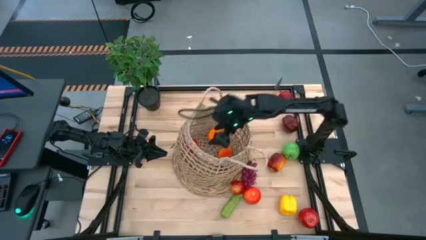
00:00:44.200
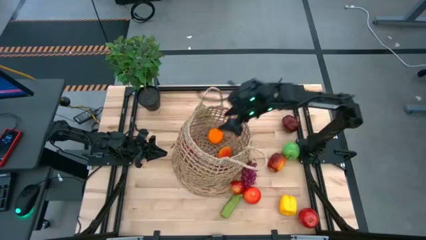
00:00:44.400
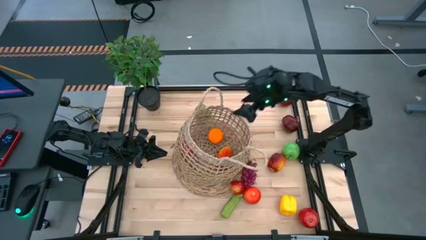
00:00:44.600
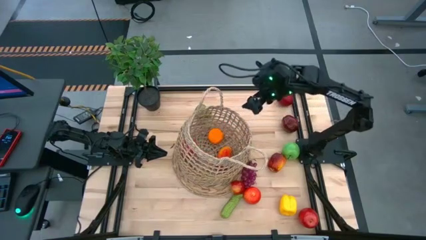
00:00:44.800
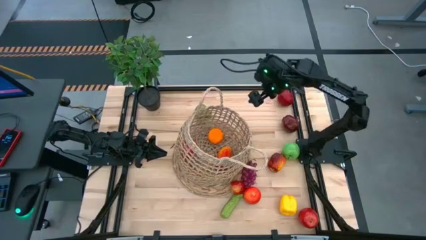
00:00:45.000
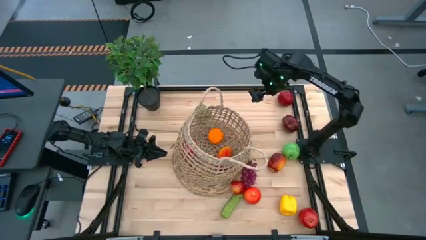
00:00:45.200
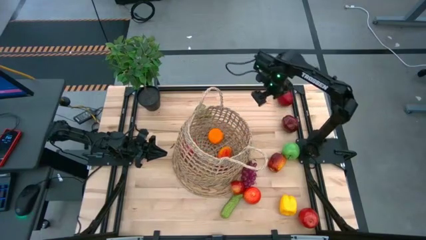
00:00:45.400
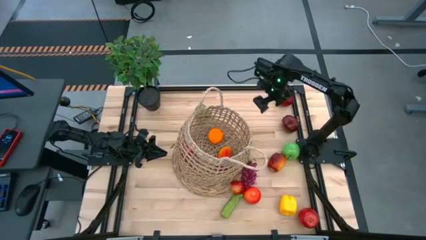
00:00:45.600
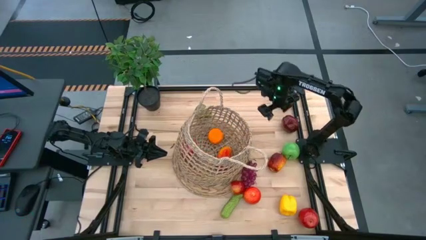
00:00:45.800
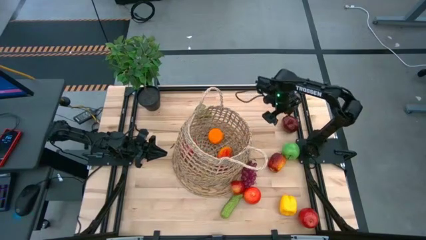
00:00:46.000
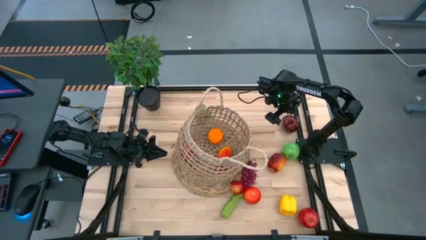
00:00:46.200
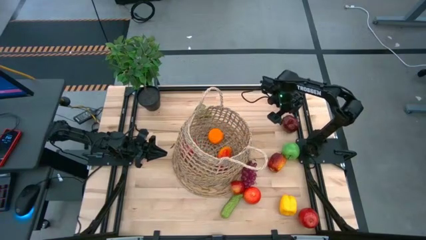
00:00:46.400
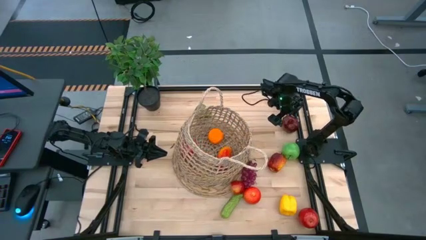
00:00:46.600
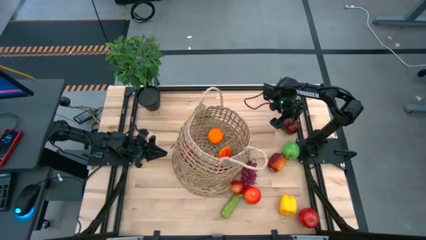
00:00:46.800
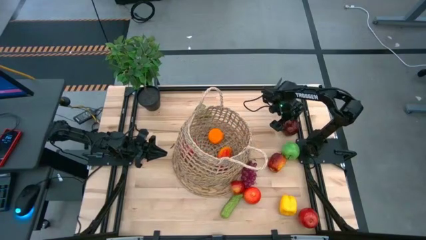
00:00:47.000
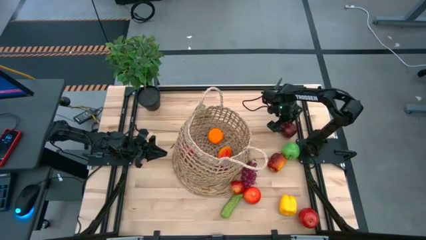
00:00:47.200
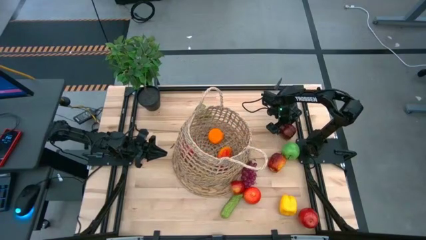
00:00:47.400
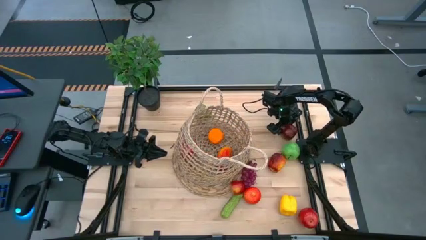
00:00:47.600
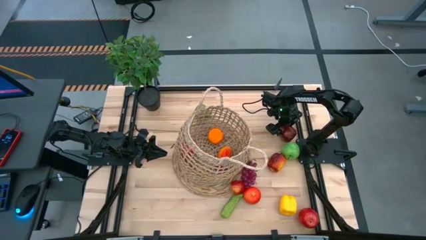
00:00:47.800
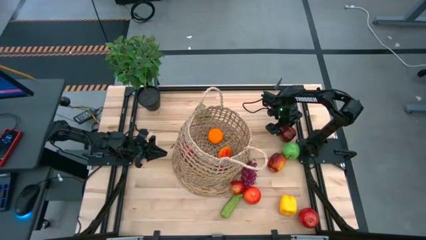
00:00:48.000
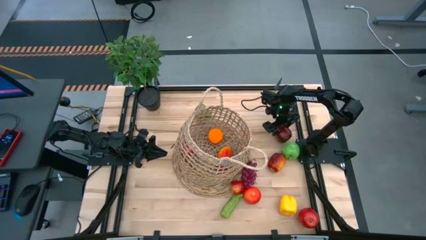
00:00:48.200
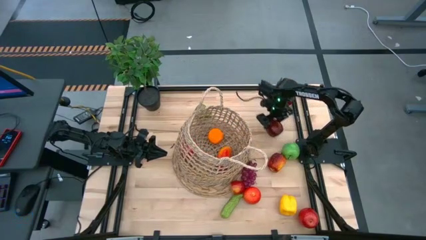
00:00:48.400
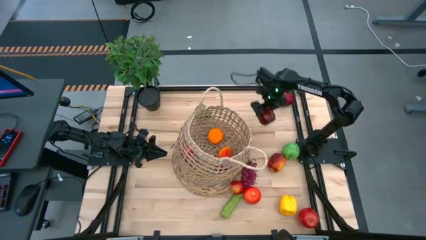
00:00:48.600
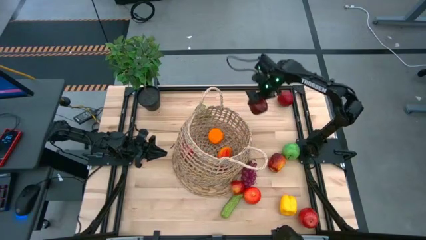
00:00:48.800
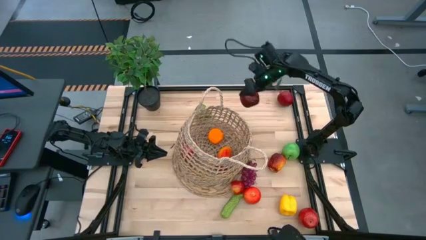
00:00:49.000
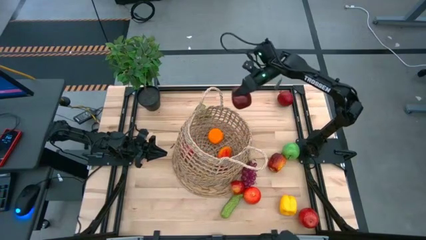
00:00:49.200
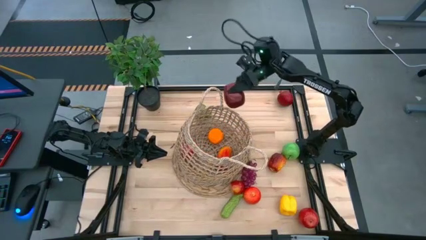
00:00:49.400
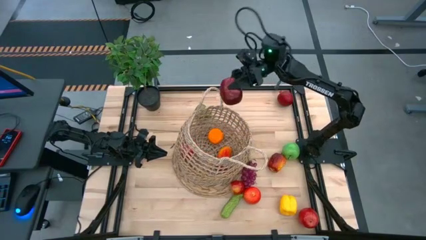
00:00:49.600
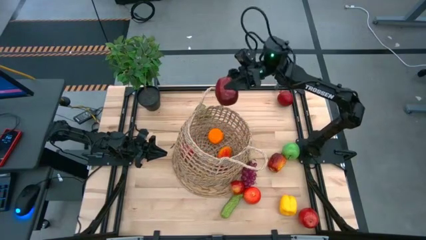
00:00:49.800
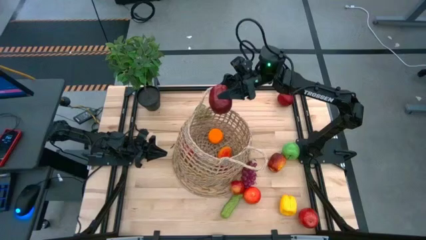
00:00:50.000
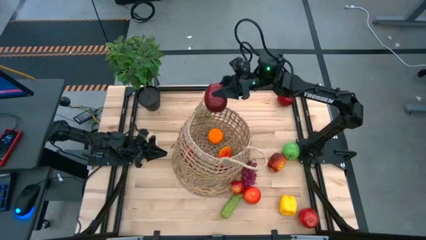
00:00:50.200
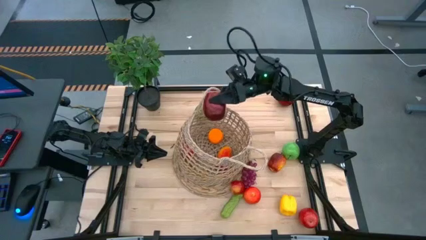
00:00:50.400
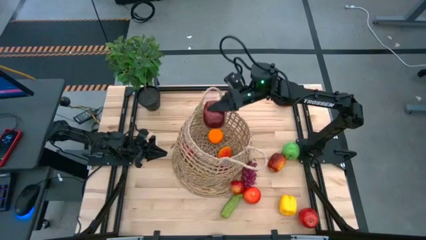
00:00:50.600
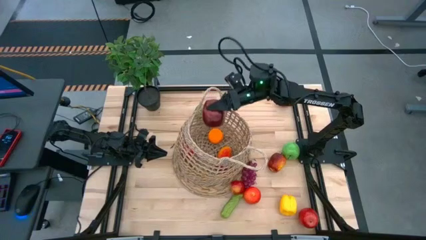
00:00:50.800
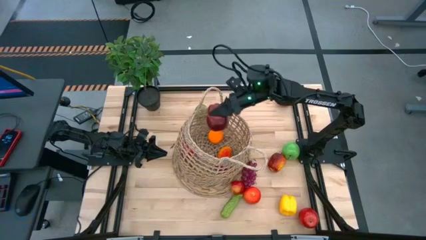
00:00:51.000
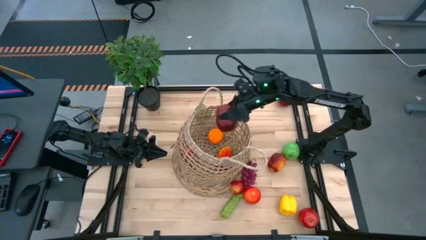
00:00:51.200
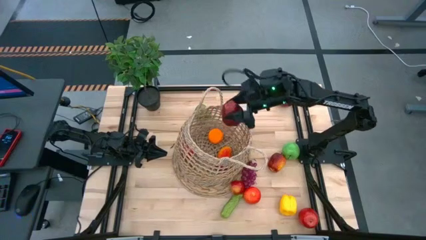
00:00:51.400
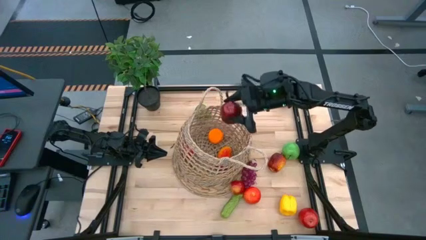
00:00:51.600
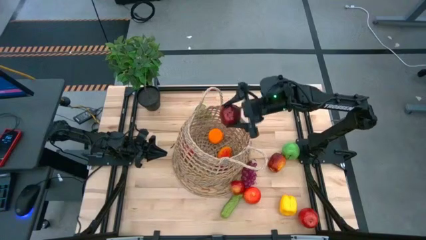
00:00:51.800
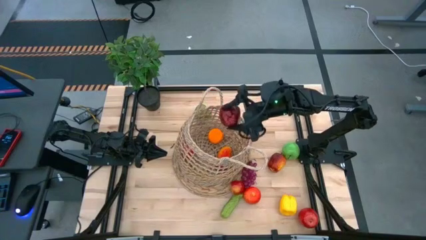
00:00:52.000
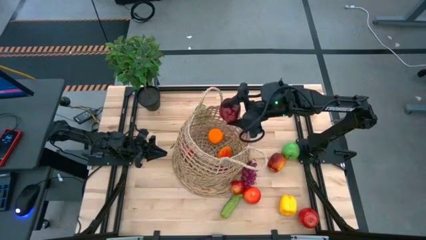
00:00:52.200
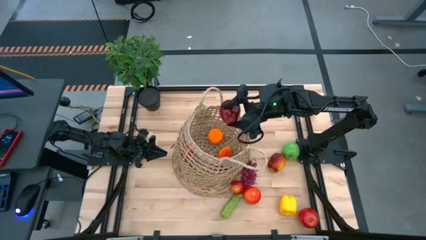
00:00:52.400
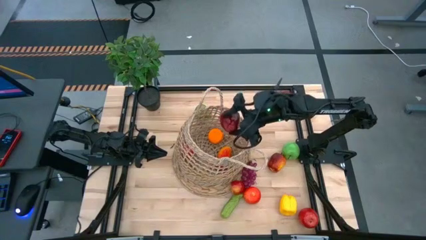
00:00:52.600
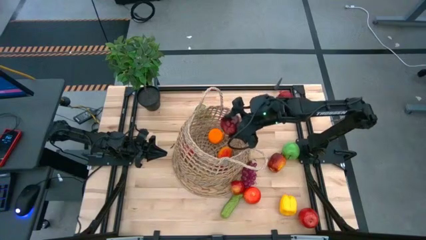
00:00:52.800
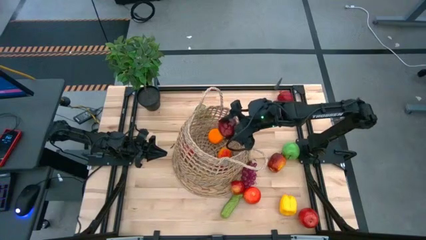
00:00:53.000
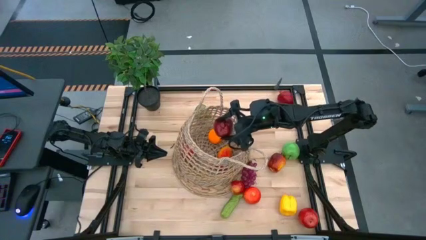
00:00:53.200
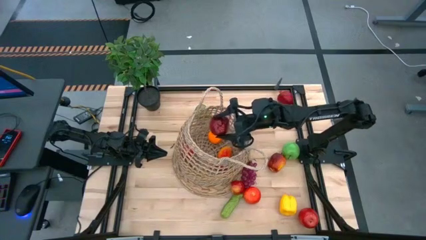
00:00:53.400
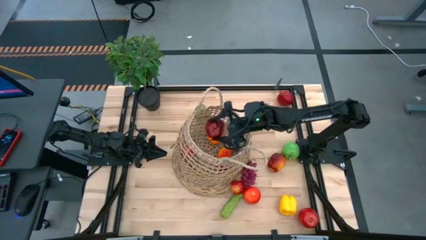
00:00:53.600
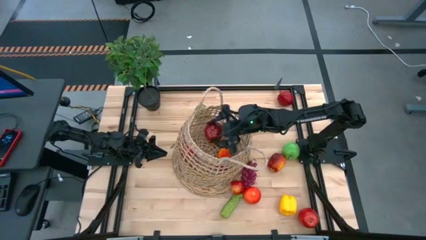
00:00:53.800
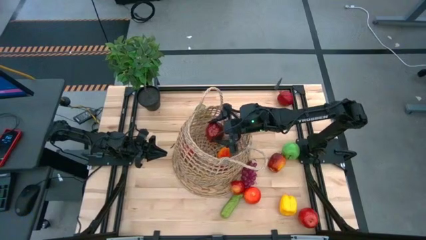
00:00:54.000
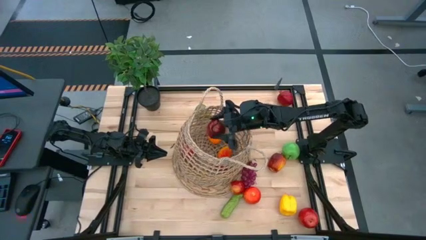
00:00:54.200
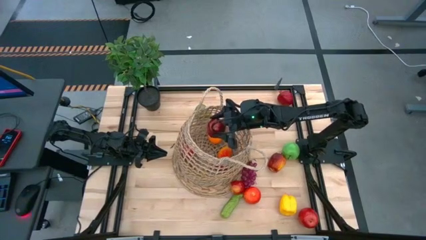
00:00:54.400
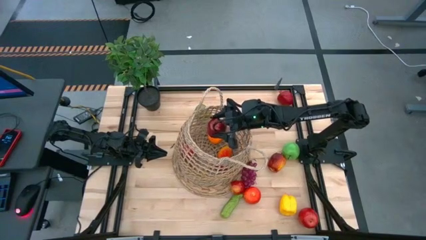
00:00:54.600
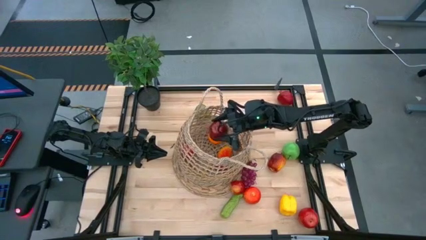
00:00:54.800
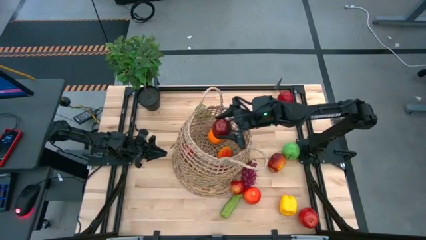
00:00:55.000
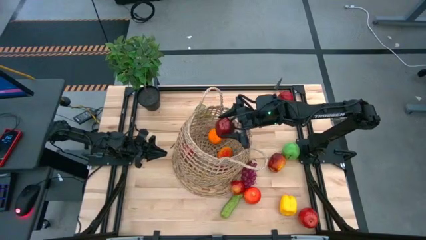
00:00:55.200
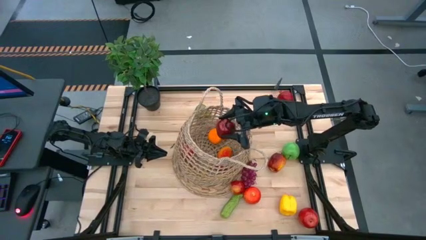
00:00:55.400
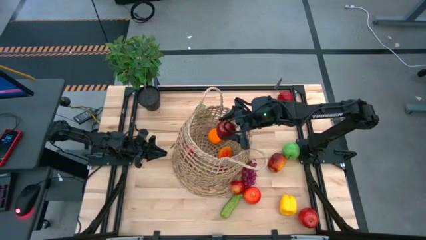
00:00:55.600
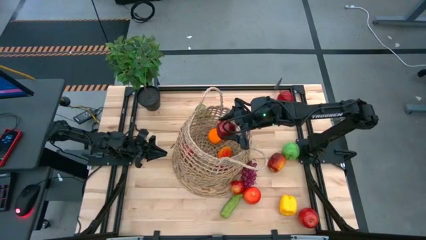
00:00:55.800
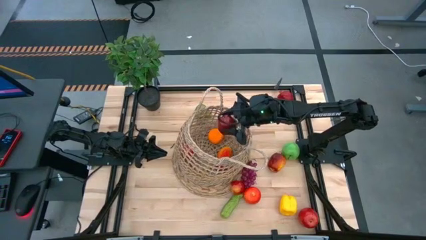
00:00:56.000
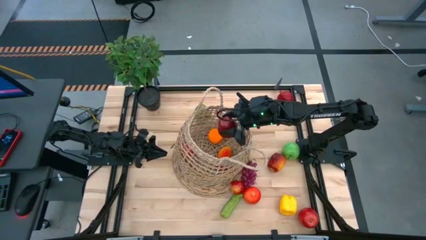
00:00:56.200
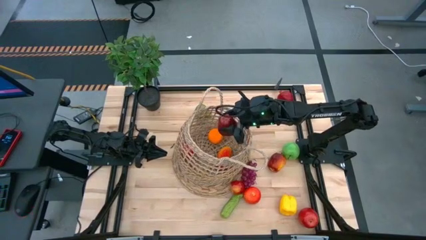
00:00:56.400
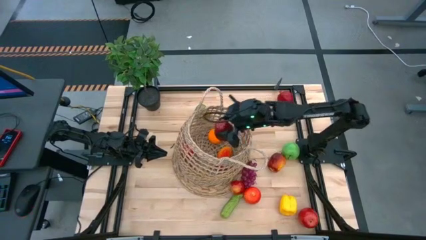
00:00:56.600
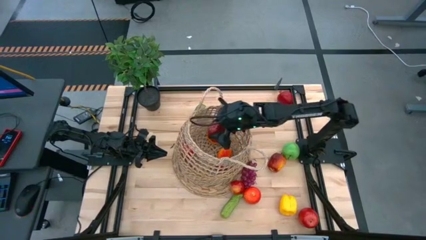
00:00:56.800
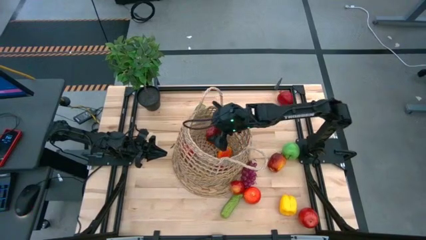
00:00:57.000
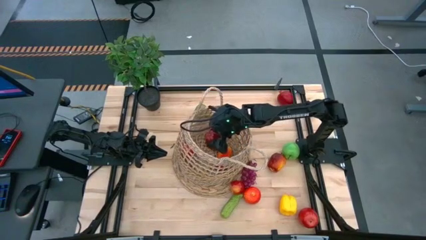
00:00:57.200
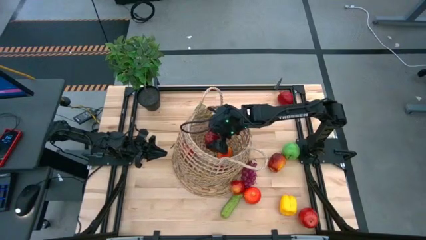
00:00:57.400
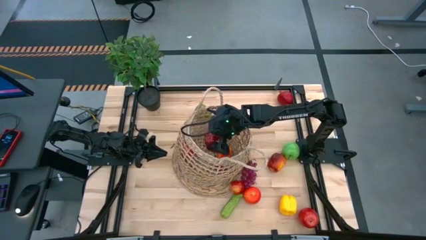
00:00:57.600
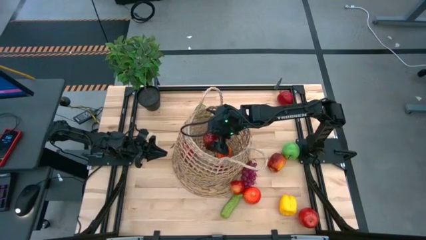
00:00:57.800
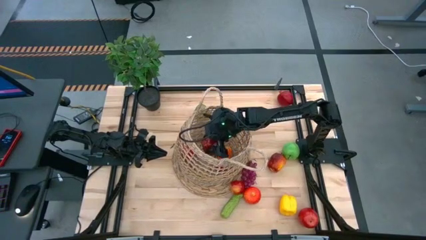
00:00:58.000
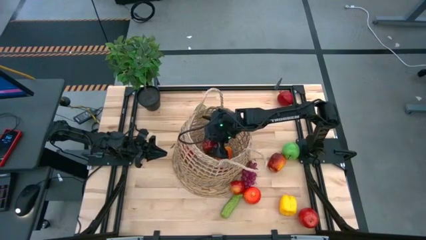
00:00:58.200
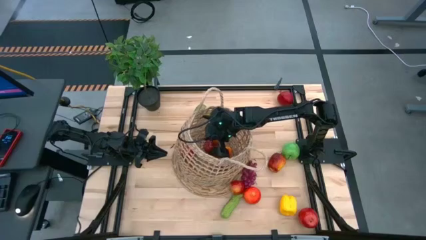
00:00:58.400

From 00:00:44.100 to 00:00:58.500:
Task: Build produce basket
Put the red apple into the brown basket

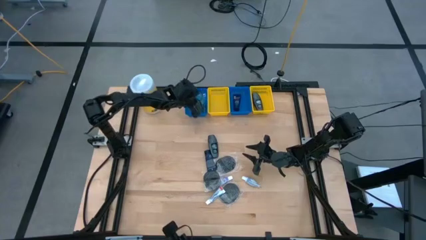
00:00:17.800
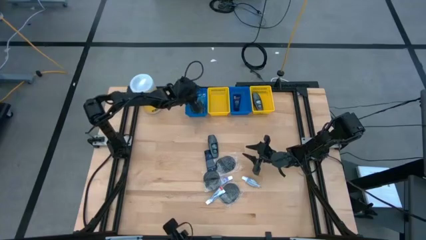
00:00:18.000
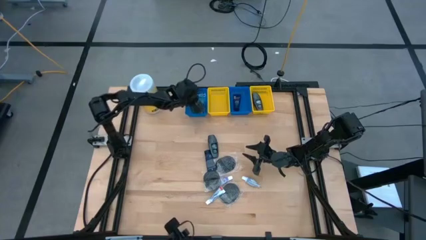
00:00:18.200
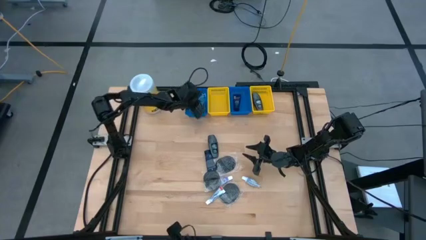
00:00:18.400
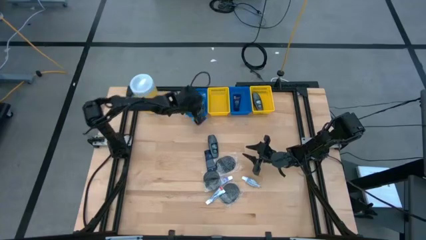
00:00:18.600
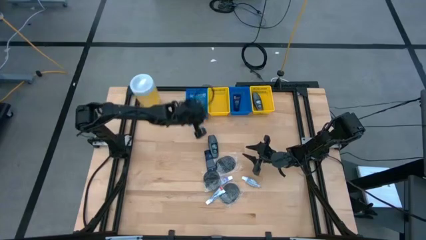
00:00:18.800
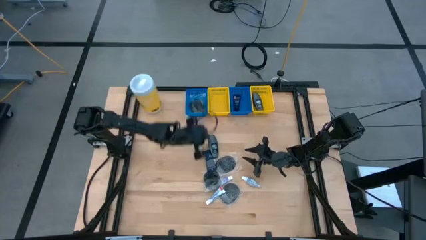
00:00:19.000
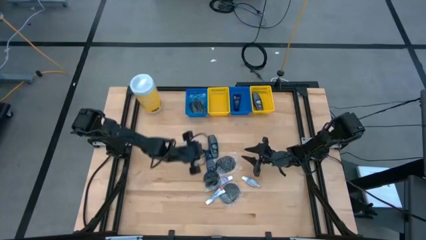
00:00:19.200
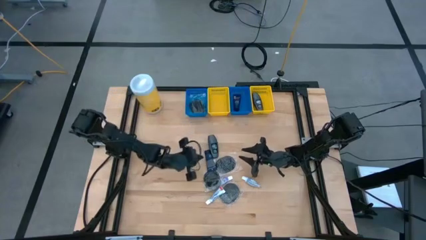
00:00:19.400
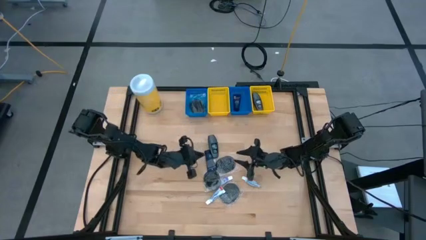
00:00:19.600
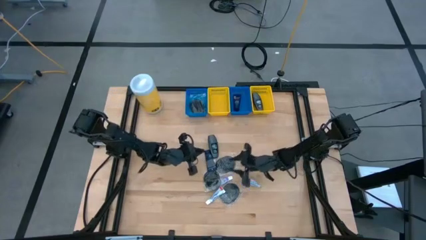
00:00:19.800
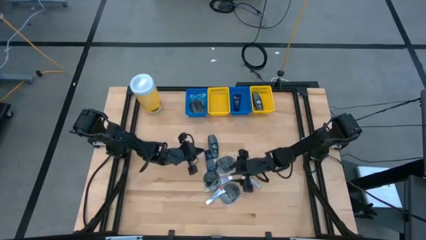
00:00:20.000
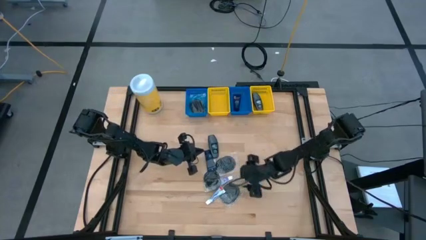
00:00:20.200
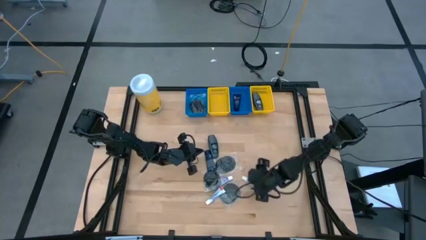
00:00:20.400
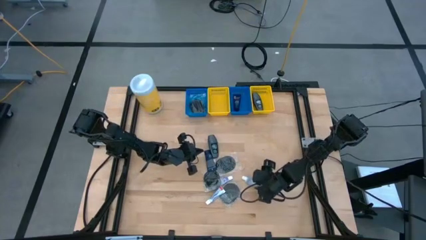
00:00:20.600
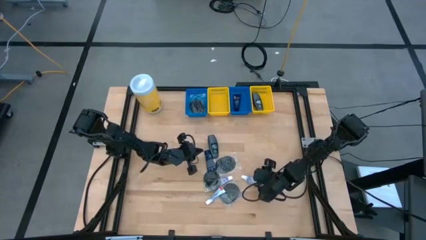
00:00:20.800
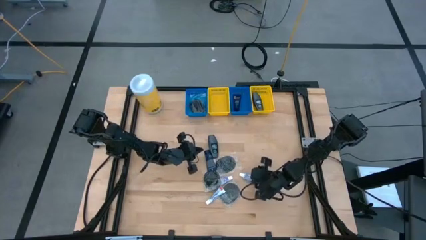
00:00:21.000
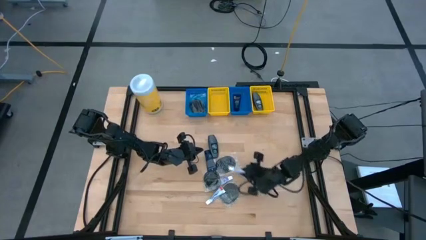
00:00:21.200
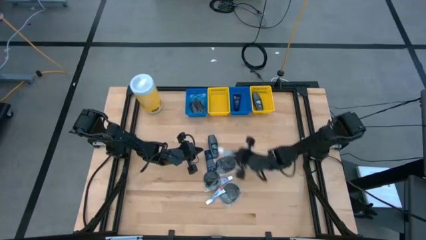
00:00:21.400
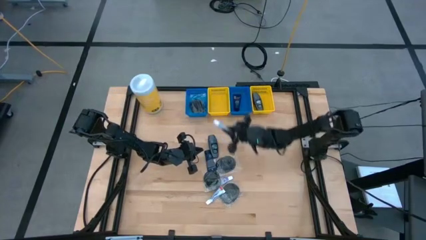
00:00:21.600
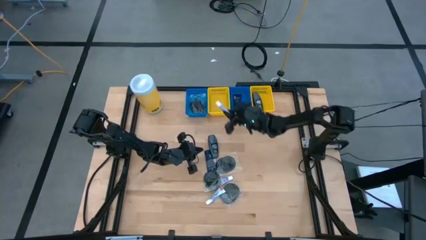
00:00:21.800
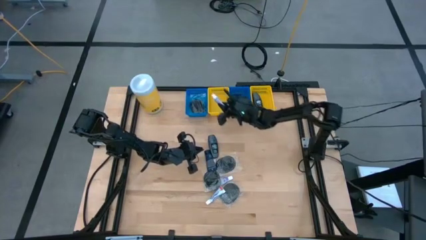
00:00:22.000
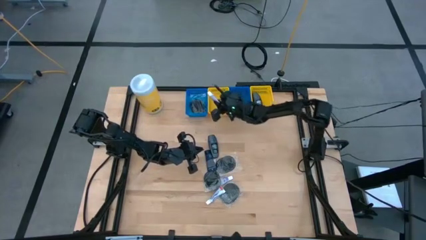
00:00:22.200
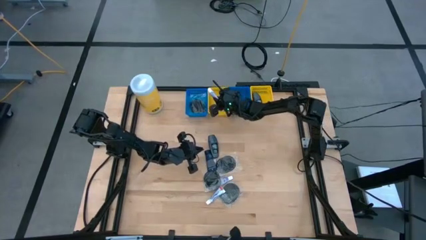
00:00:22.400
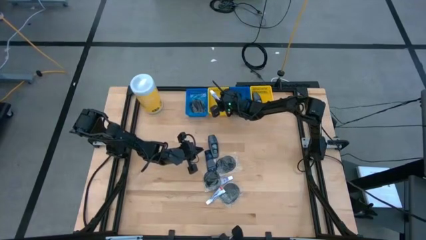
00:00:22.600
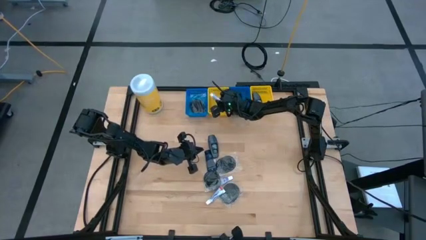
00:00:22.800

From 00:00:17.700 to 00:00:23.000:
Task: Pick & Place Travel size toiletries
Put the white toothpaste into the left yellow bin
